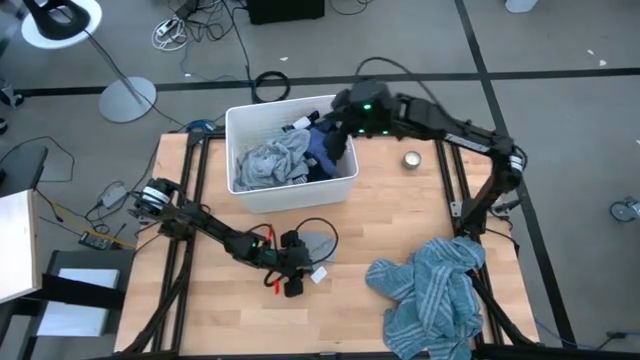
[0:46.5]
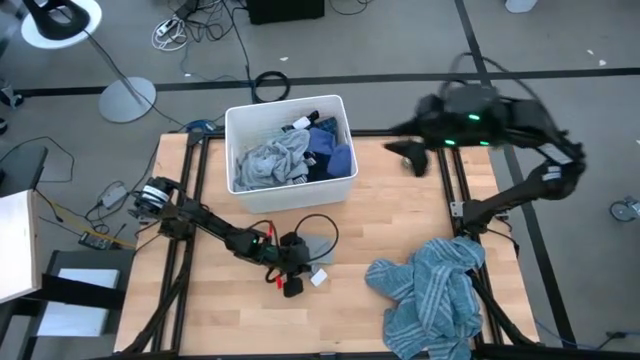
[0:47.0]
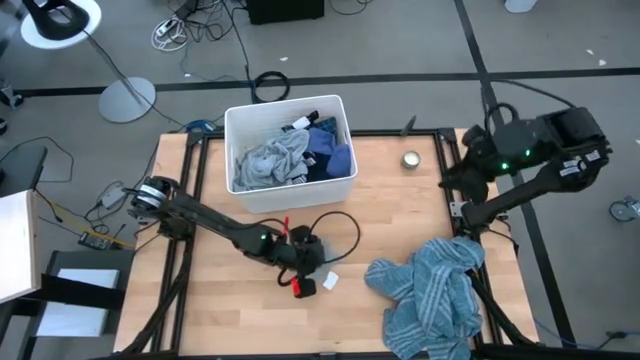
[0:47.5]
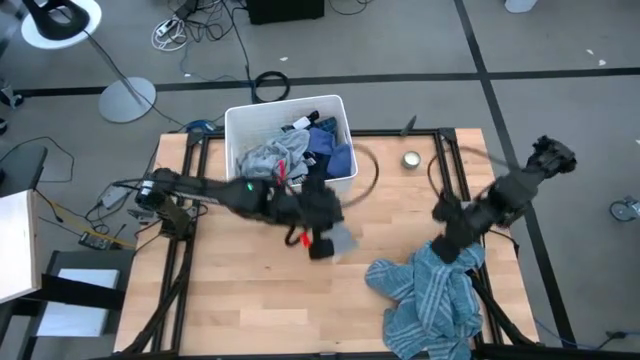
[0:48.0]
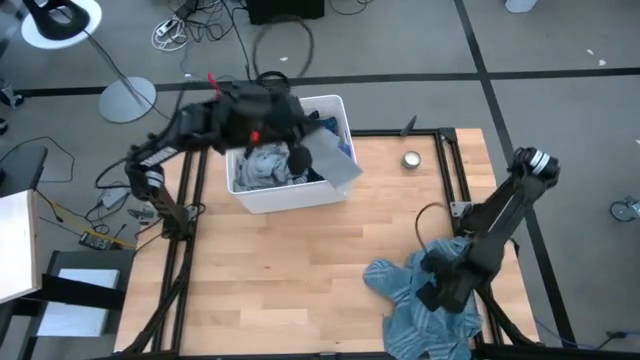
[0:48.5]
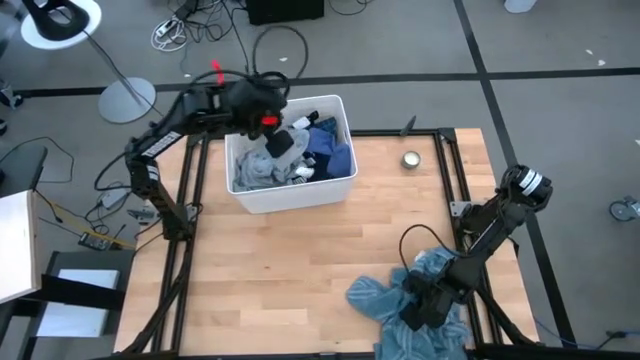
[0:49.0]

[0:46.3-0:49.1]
Task: Sort clothes
Put the gray sock into the white laundry bin

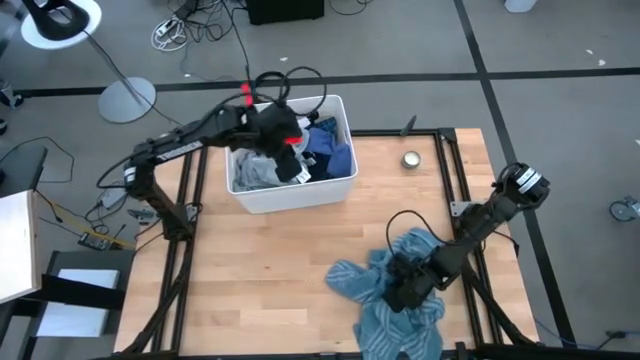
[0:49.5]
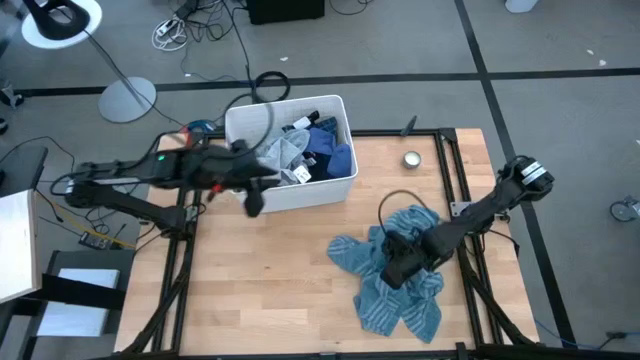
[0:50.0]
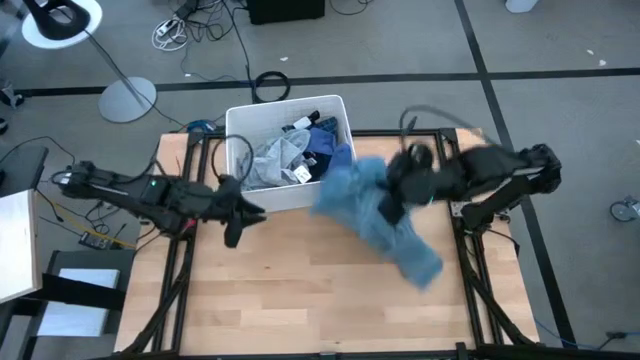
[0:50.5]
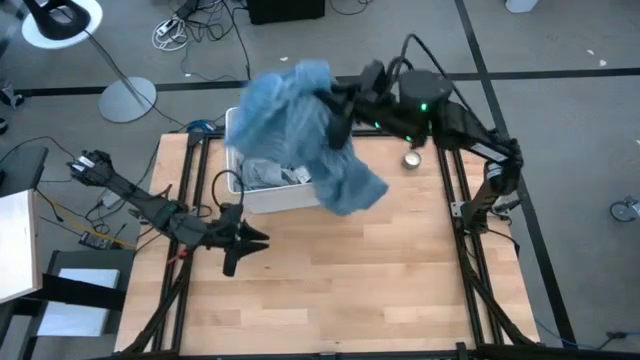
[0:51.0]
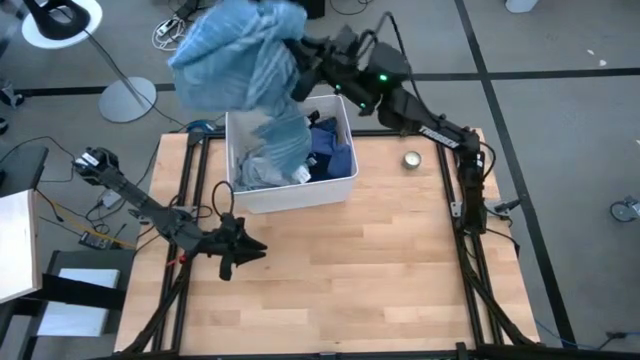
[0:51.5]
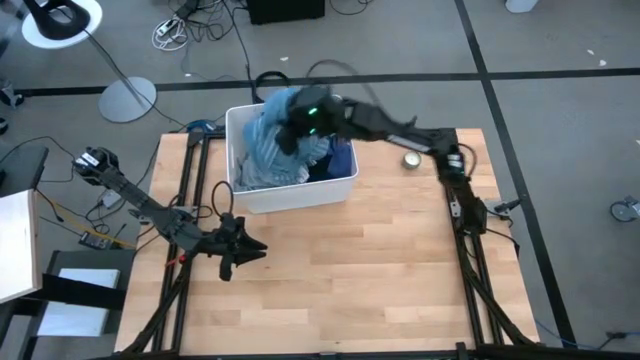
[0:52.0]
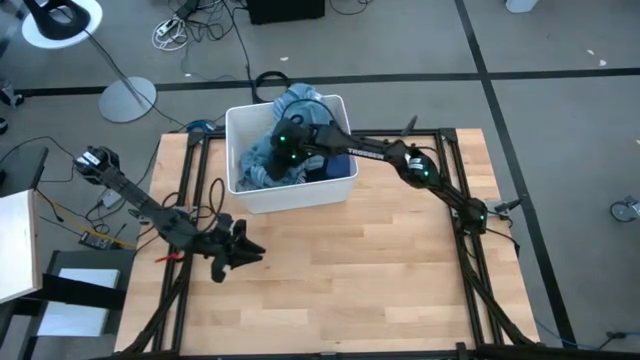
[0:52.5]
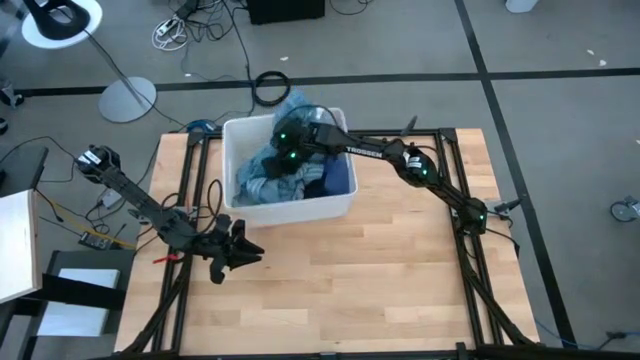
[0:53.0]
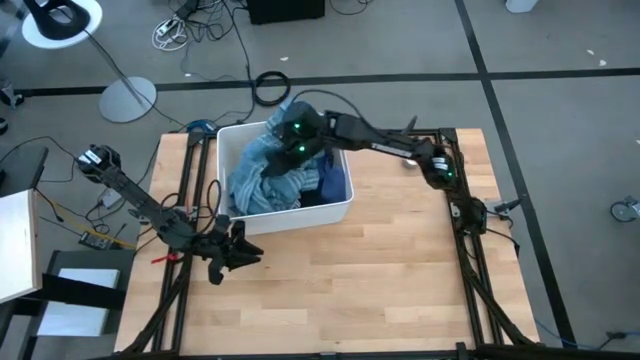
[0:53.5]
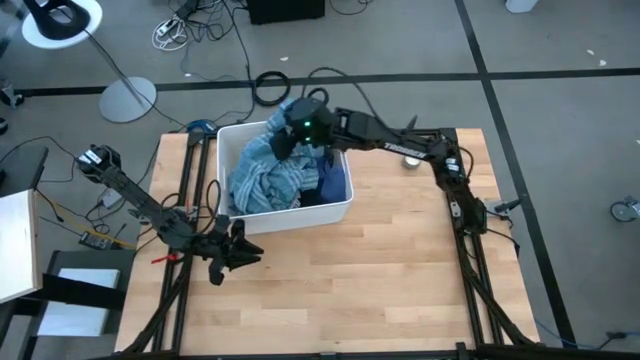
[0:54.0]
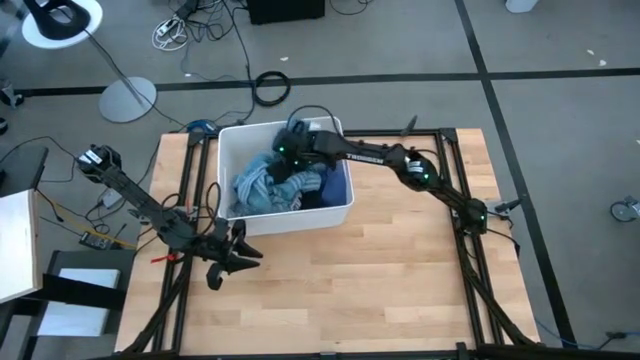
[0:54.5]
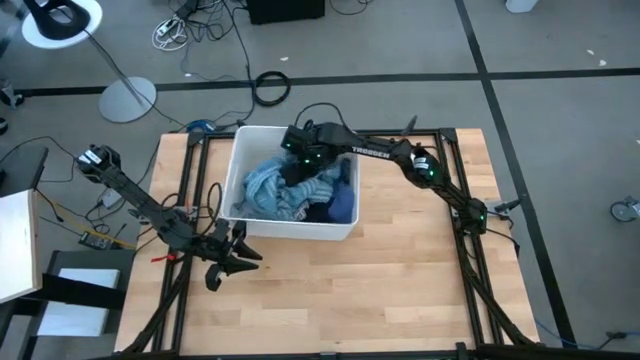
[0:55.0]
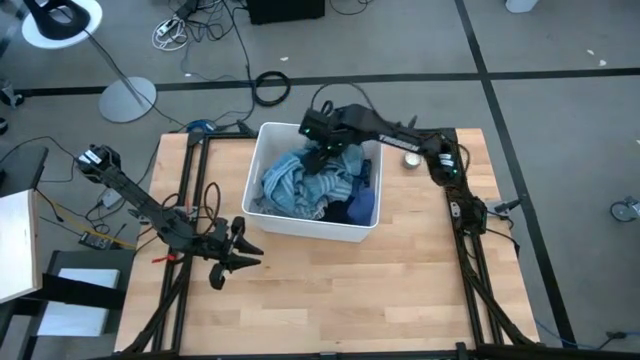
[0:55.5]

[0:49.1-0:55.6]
Put the light blue polo shirt into the white laundry bin

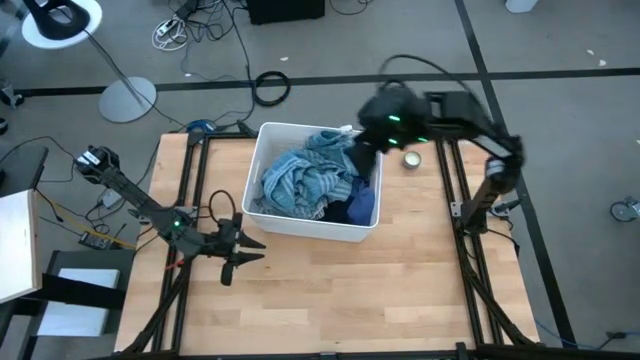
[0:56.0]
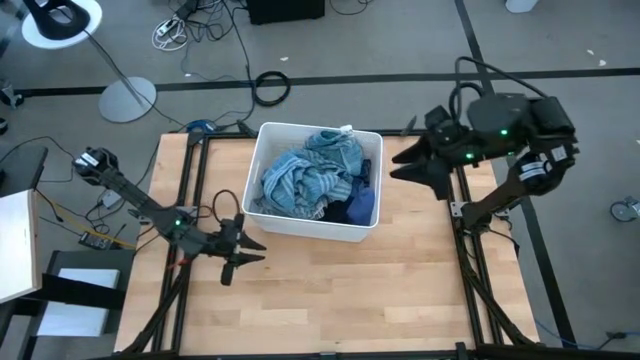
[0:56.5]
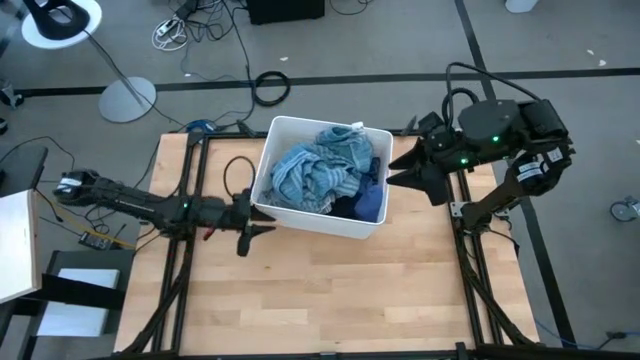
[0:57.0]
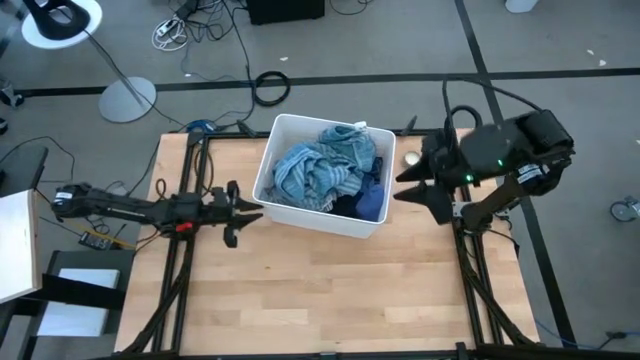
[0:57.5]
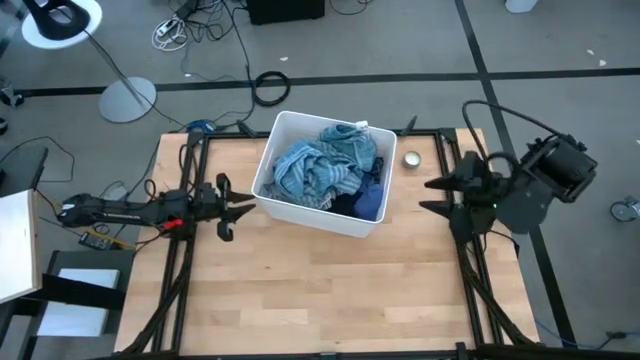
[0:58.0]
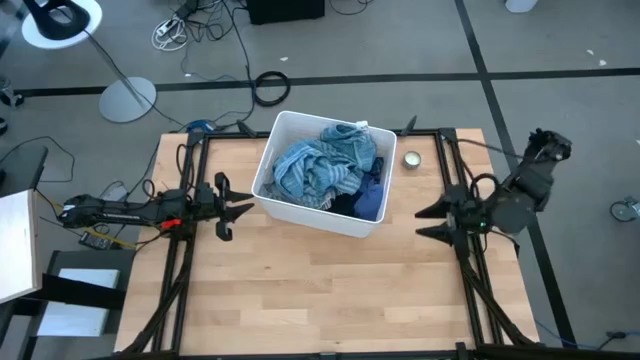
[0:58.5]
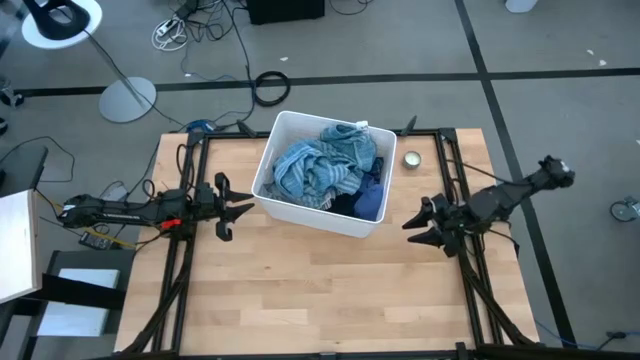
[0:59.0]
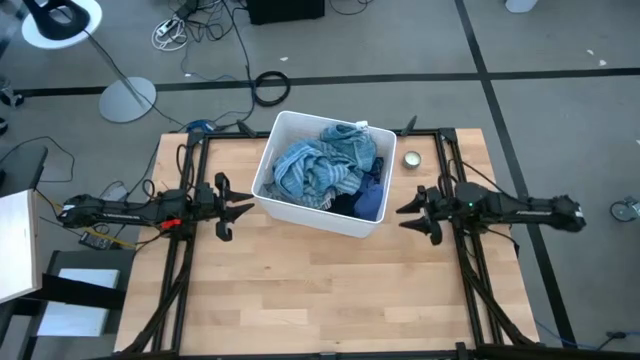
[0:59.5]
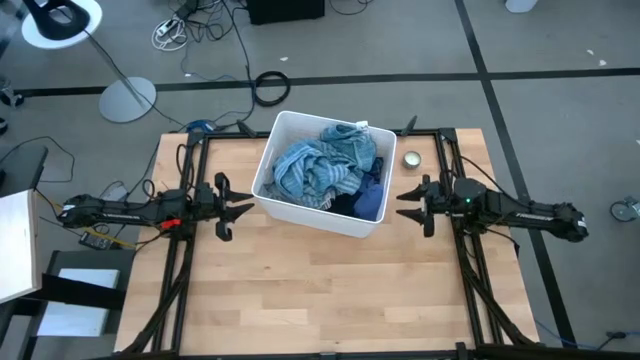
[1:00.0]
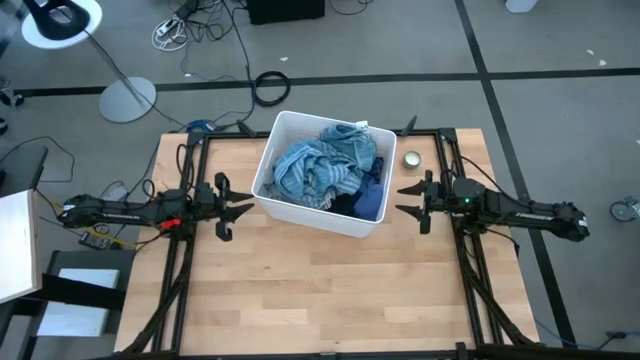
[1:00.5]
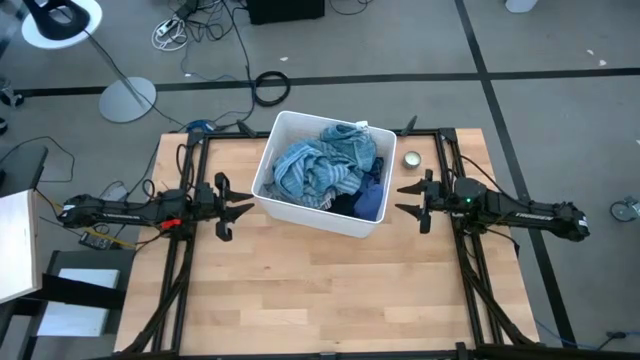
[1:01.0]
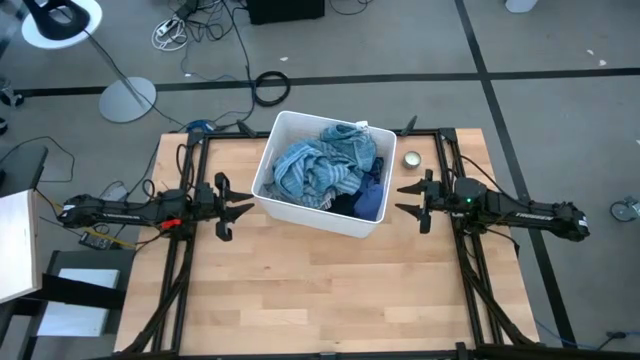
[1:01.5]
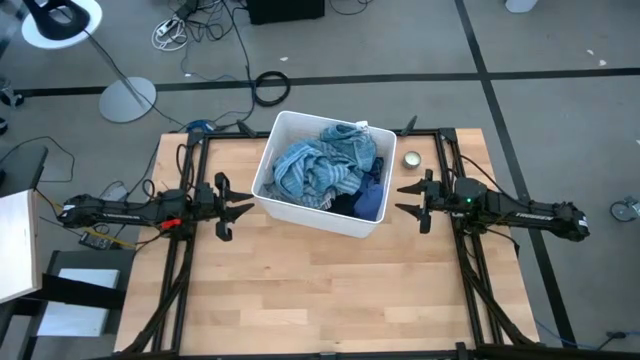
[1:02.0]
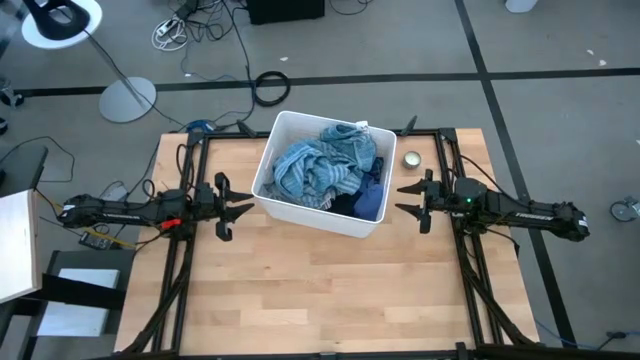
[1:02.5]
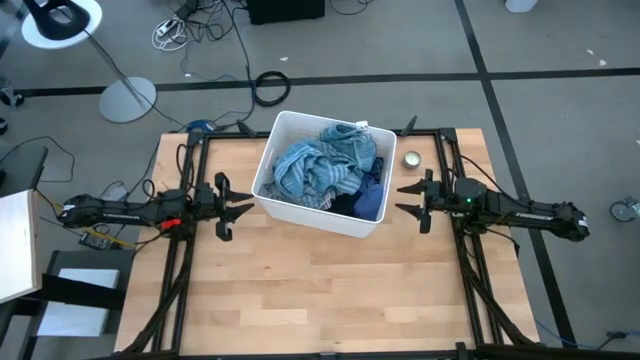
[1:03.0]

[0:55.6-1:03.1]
Return to Home Position

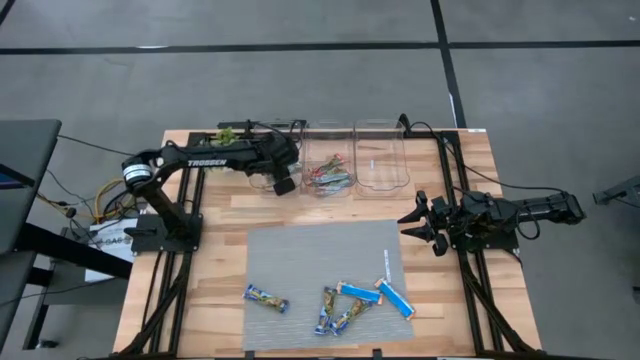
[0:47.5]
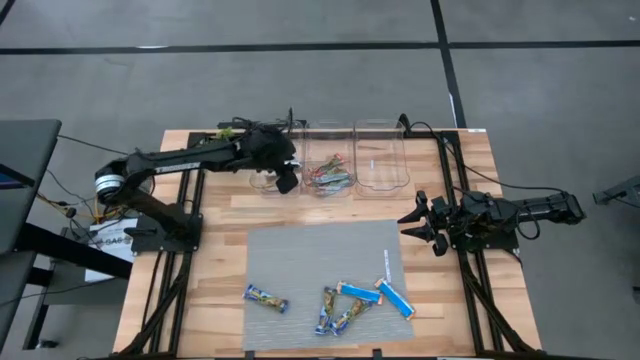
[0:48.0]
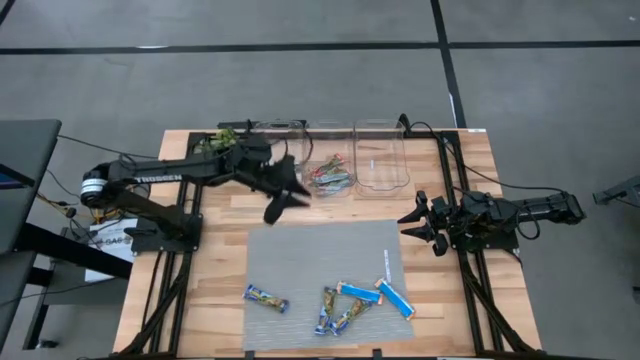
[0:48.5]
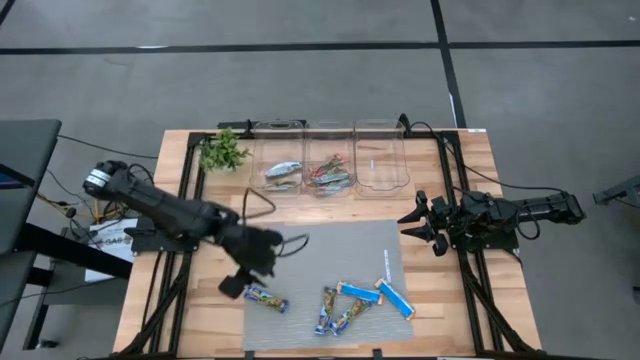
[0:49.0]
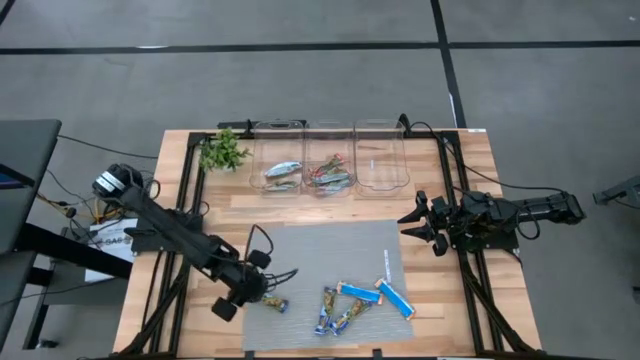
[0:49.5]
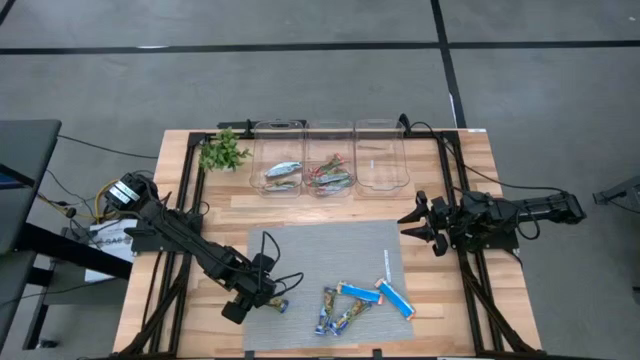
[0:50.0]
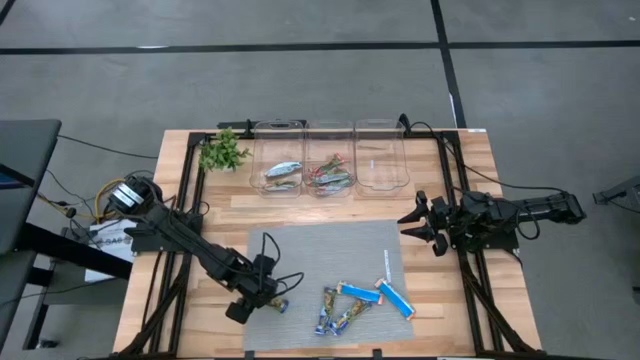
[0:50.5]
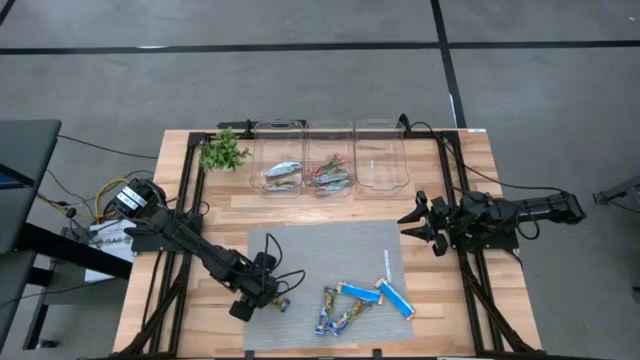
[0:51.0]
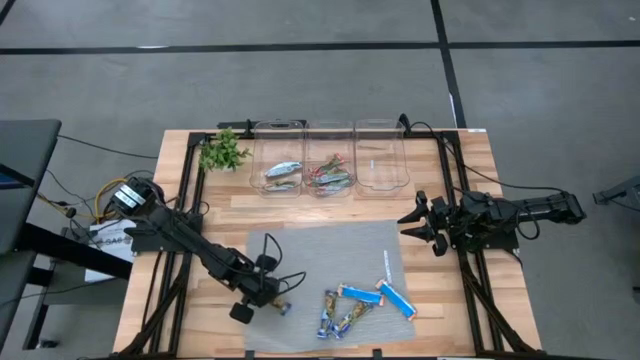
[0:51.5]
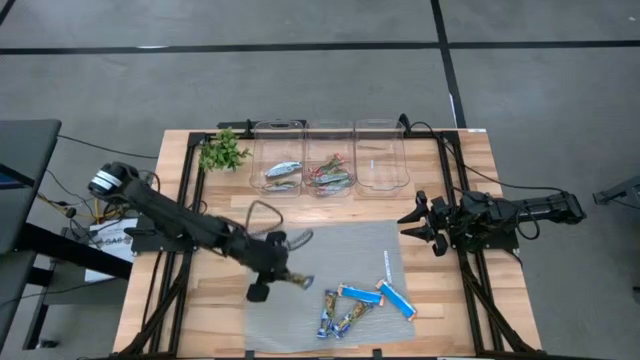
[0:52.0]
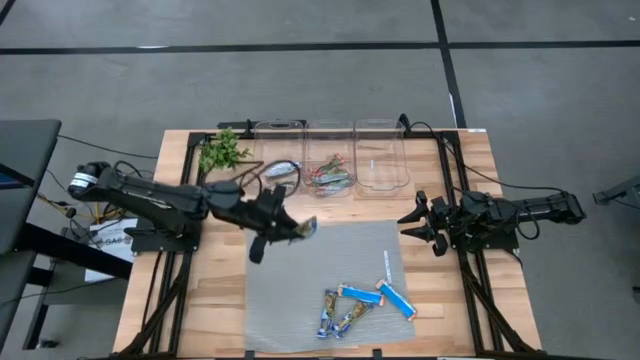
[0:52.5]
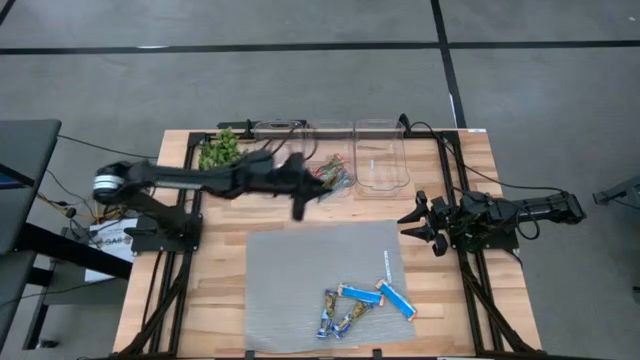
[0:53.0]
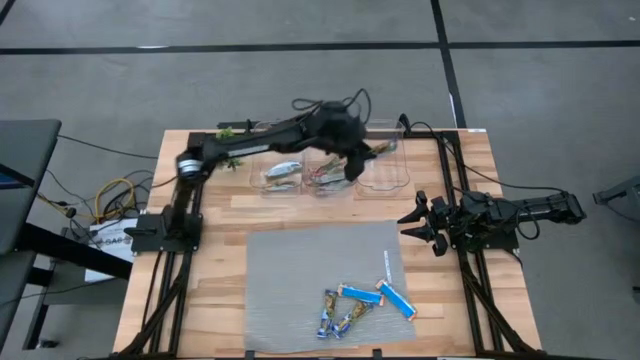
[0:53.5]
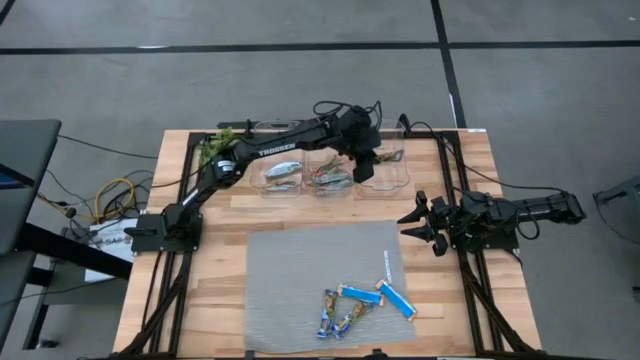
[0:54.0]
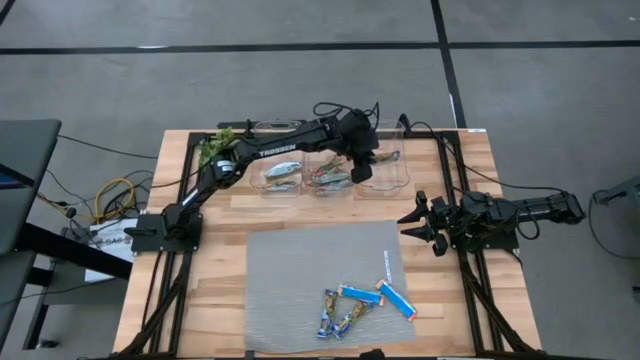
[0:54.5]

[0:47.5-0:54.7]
Task: Pick and place Granola Bars by type
Put the purple granola bar into the right transparent bin
